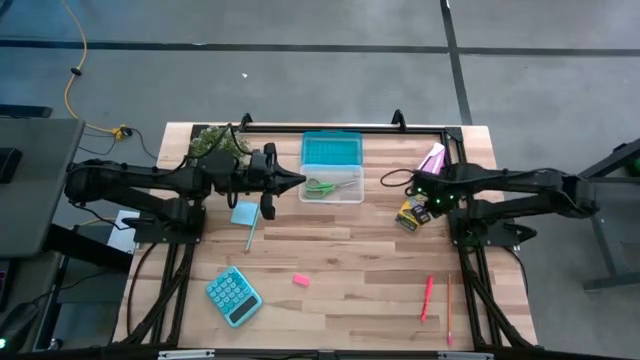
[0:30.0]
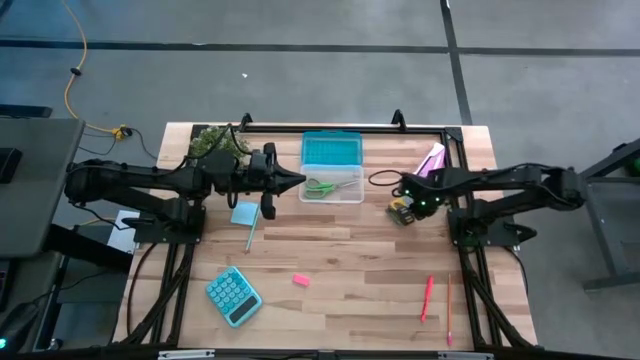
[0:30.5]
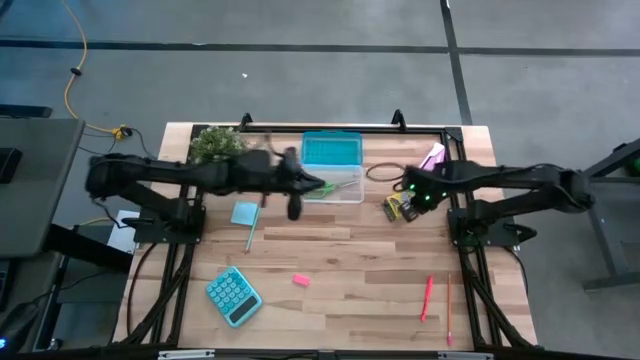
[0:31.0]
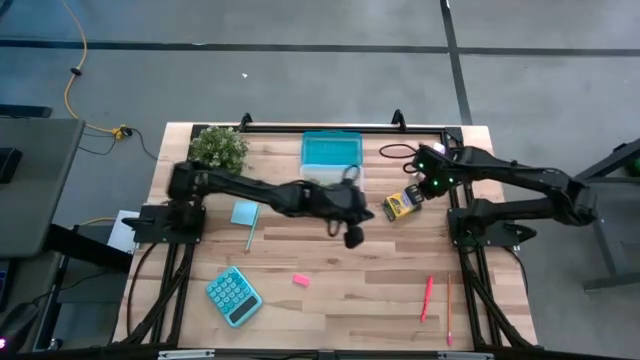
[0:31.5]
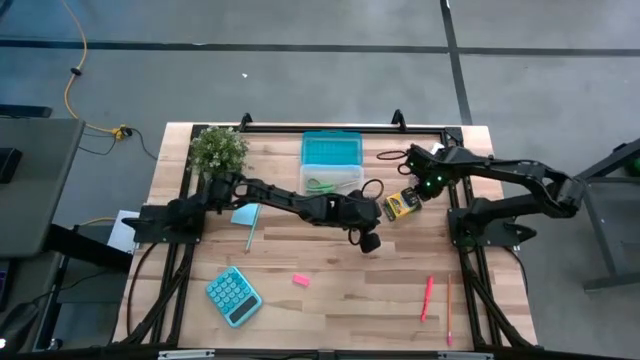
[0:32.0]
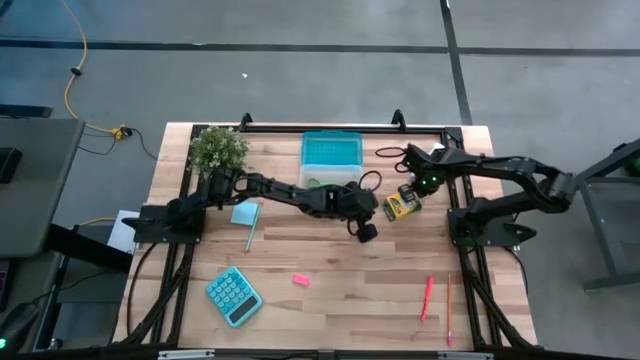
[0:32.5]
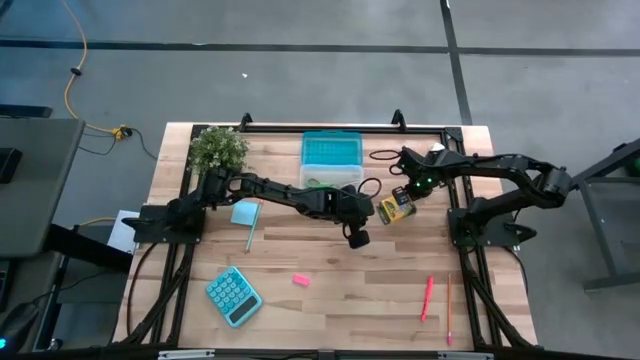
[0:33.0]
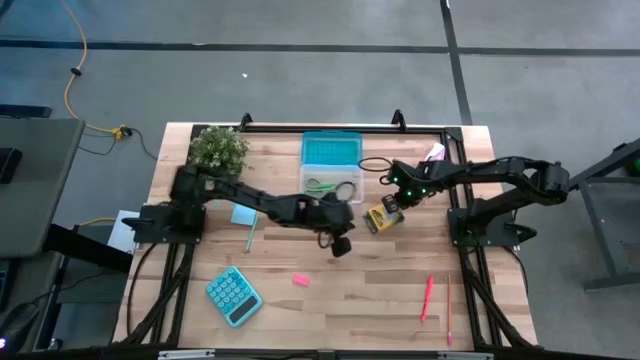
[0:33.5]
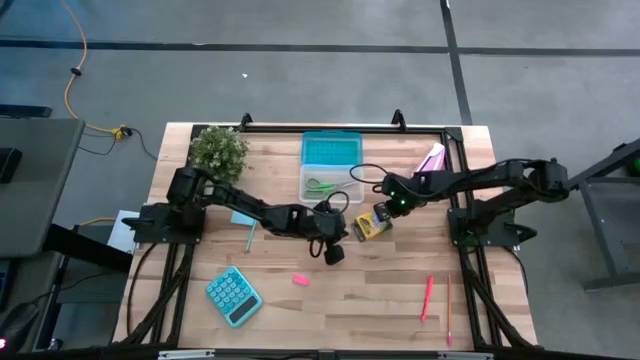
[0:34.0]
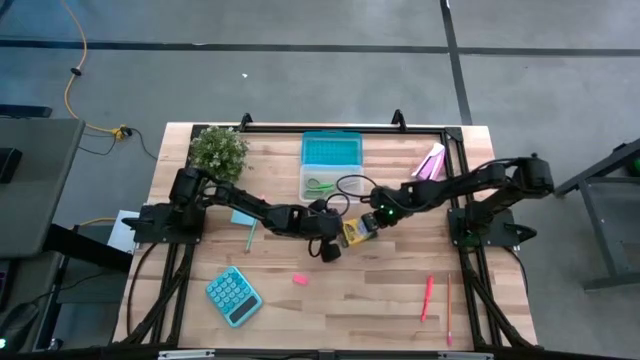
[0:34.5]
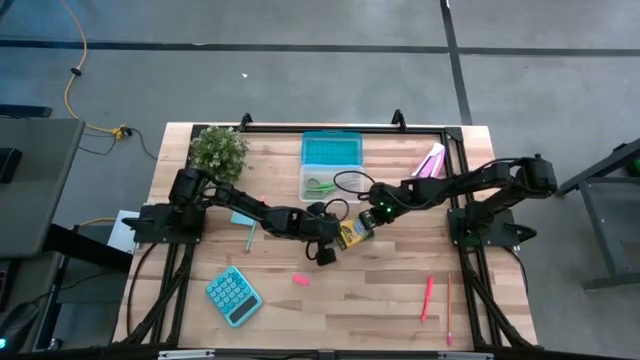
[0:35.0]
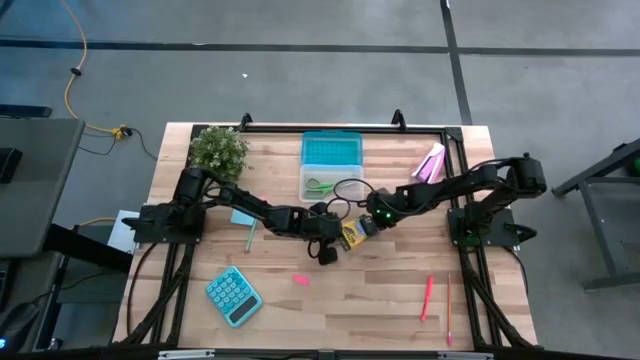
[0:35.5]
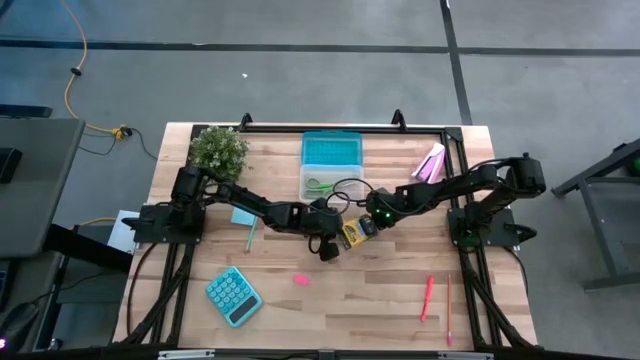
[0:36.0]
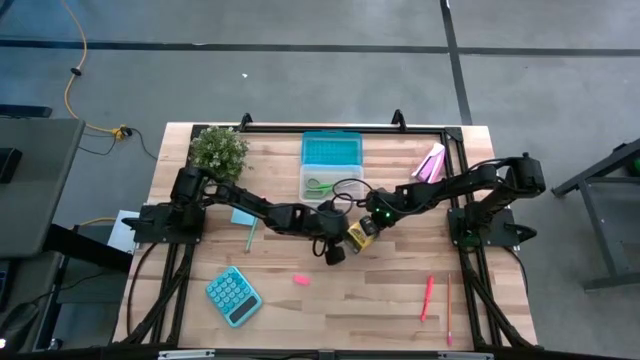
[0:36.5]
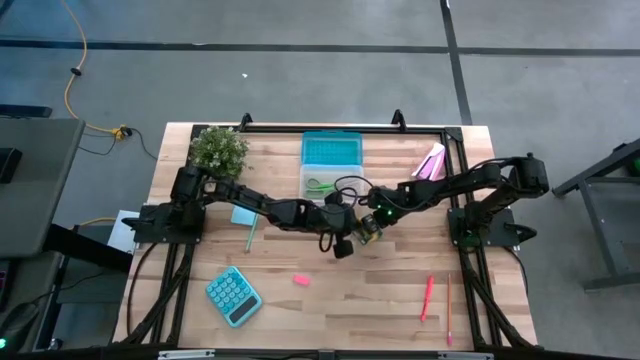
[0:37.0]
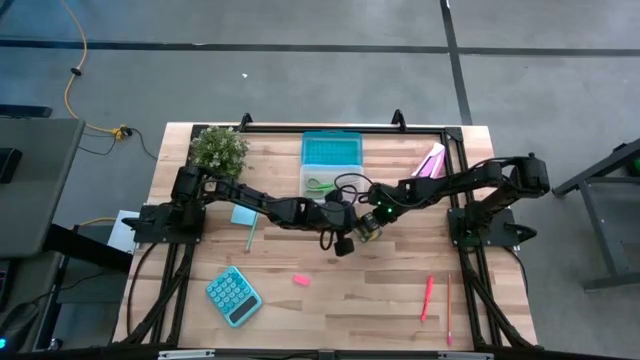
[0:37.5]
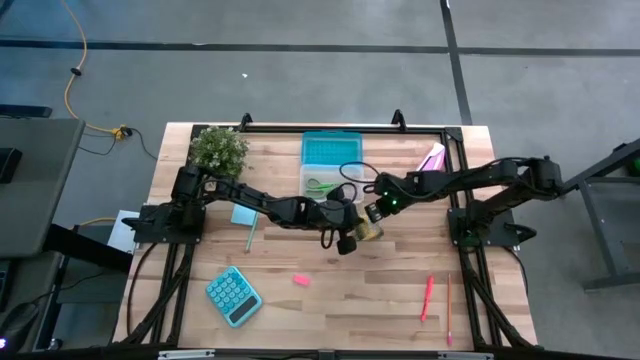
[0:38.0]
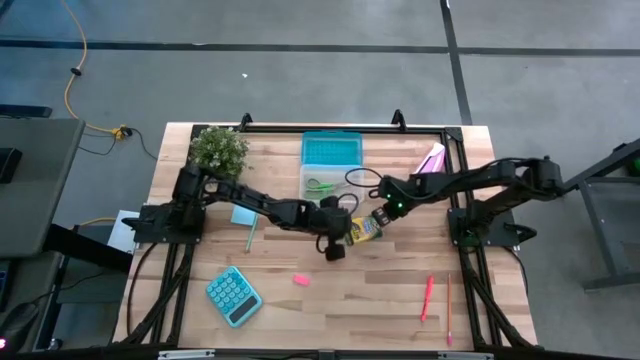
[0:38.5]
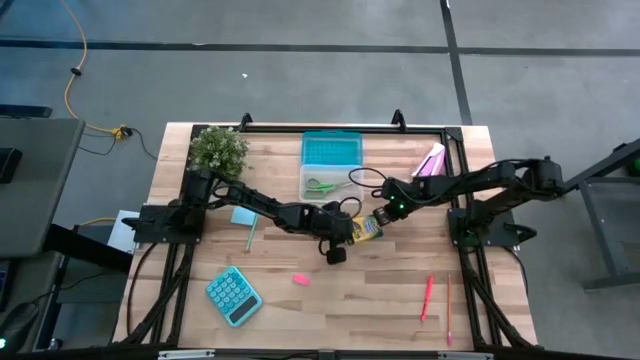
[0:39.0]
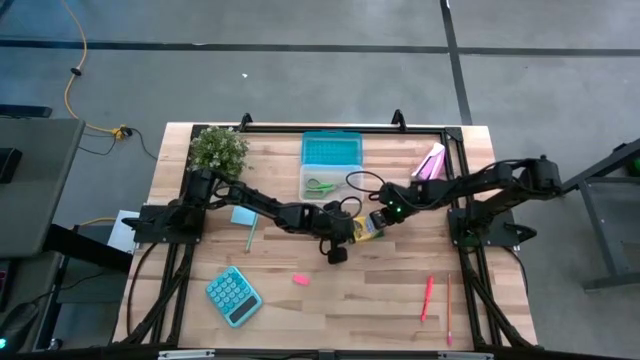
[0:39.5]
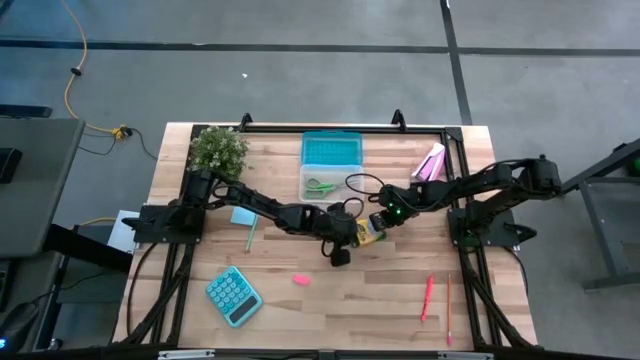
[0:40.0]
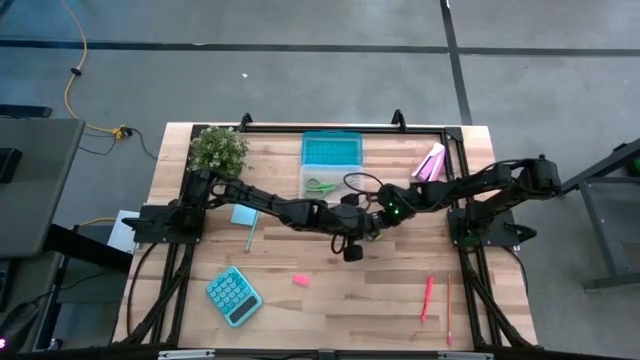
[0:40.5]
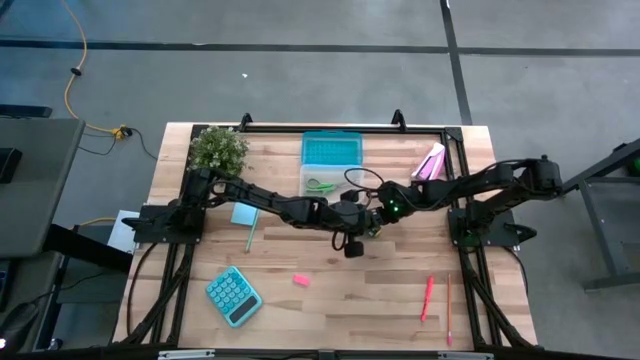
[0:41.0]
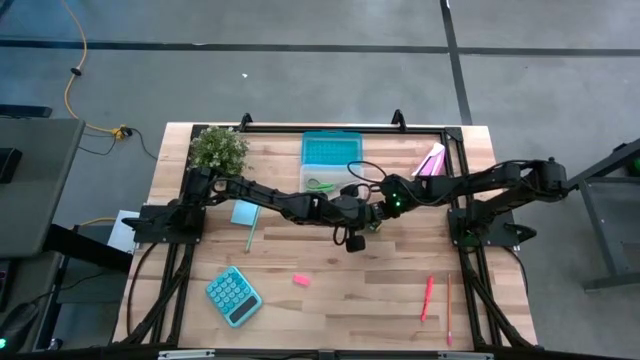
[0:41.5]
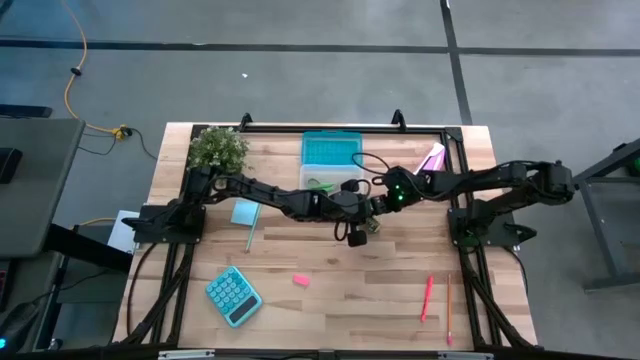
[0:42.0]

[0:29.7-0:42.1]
Task: Pack school essentials
Put the crayon box into the supply box

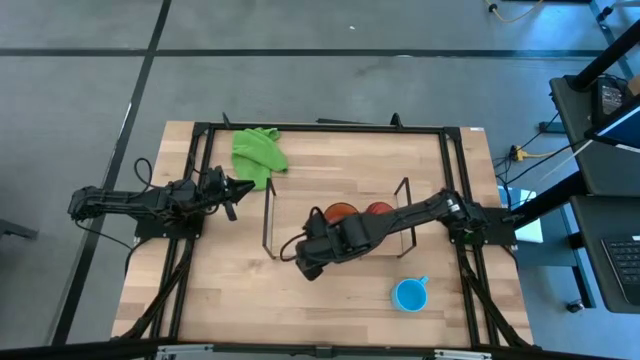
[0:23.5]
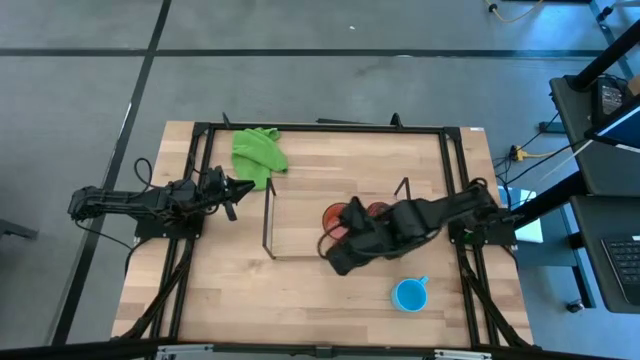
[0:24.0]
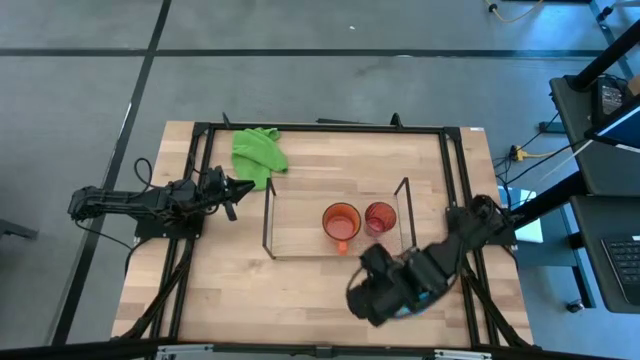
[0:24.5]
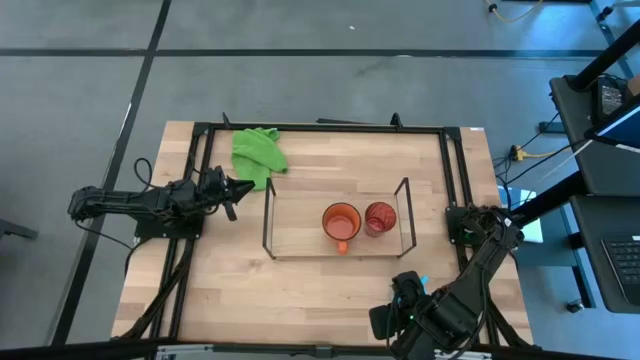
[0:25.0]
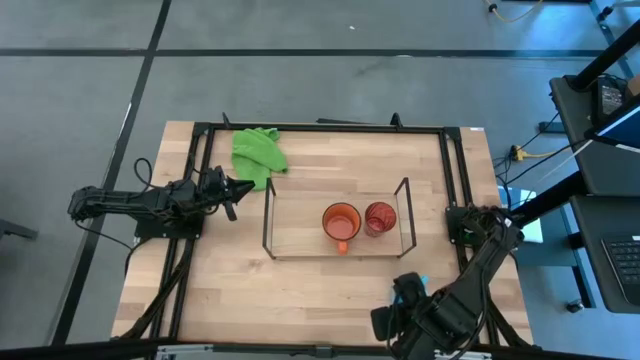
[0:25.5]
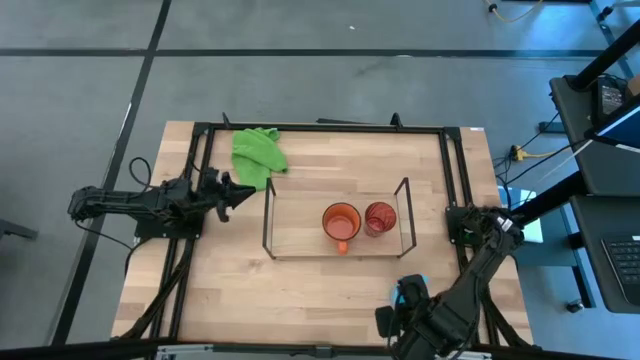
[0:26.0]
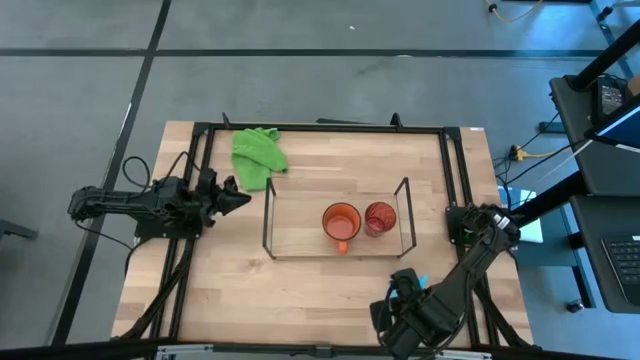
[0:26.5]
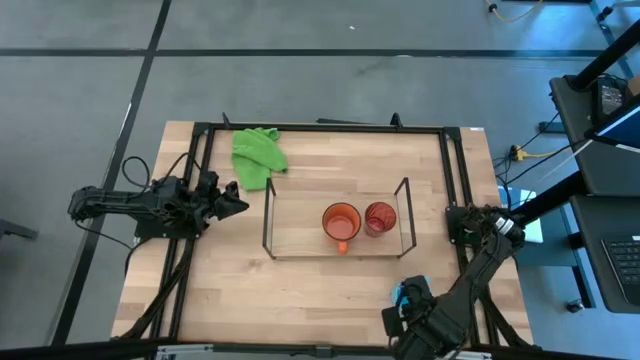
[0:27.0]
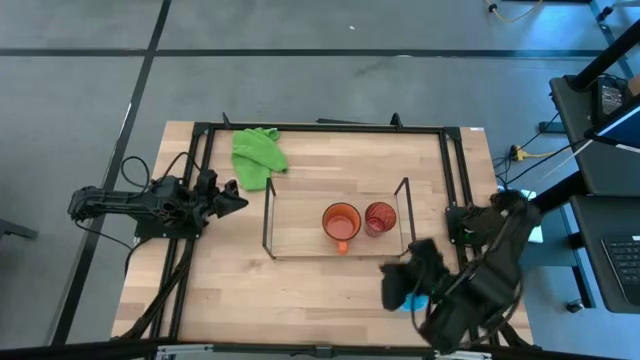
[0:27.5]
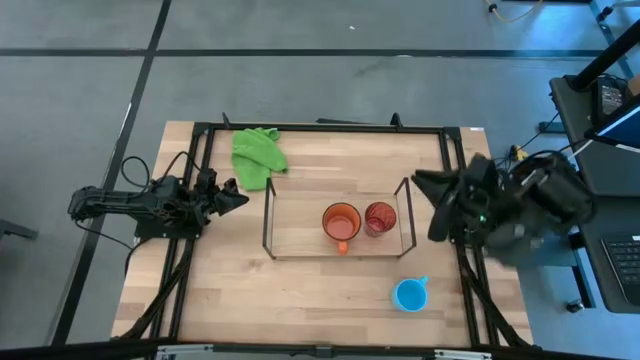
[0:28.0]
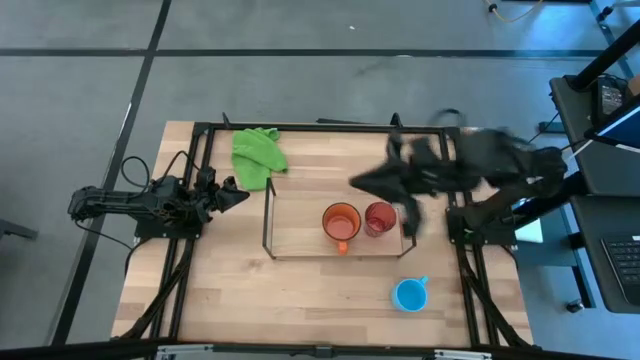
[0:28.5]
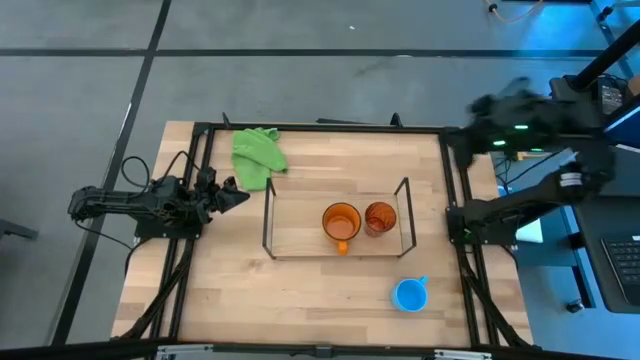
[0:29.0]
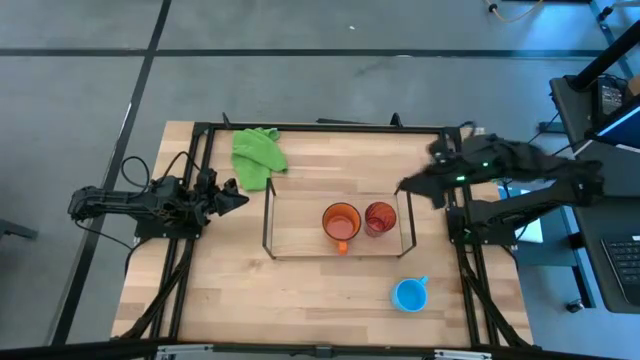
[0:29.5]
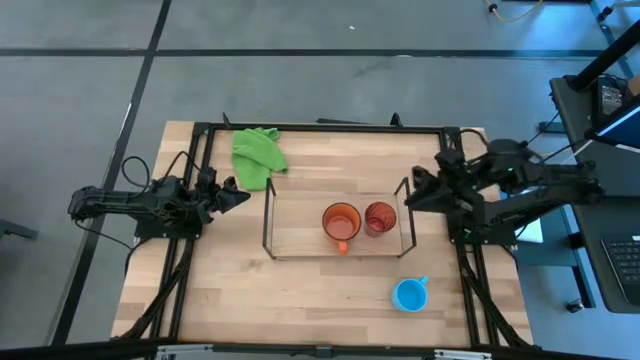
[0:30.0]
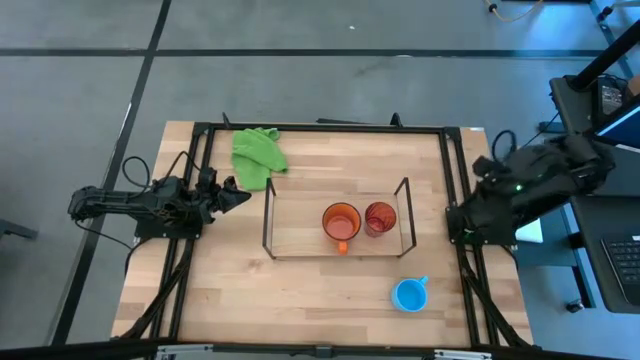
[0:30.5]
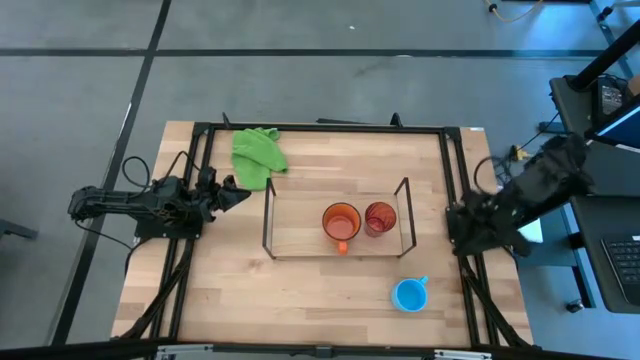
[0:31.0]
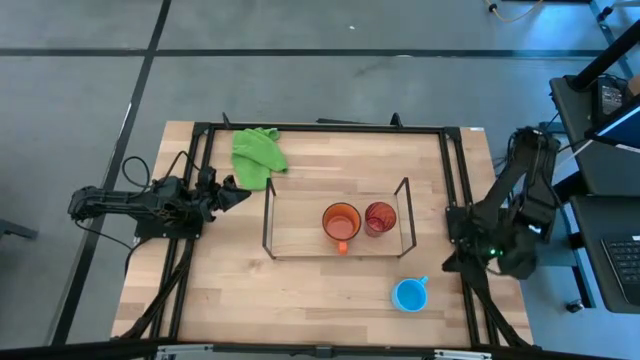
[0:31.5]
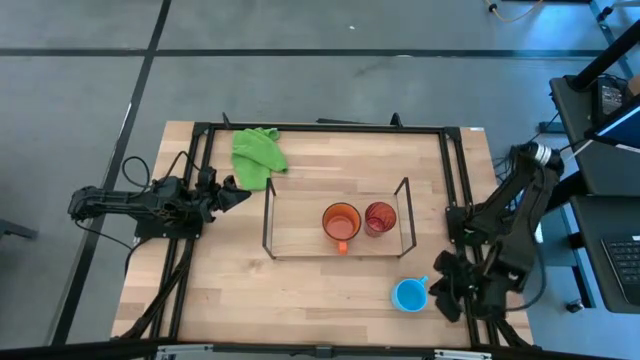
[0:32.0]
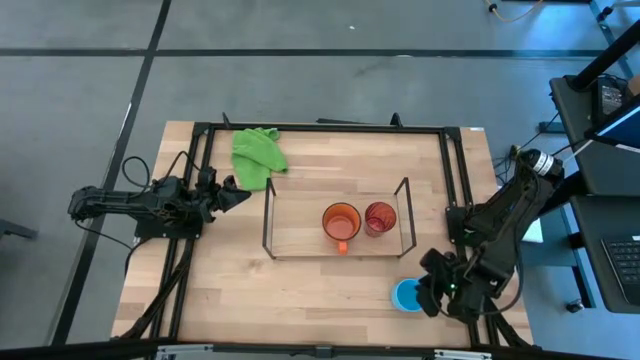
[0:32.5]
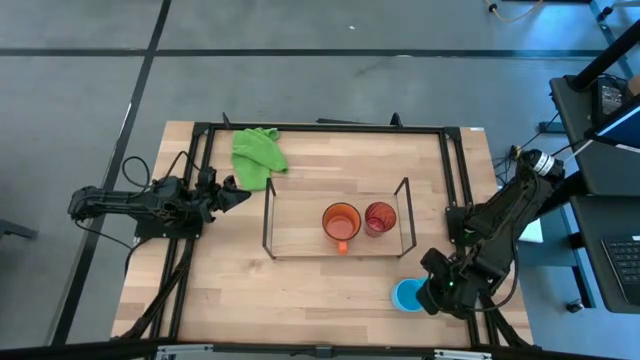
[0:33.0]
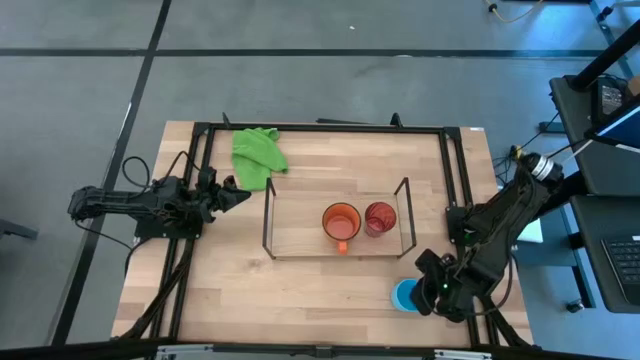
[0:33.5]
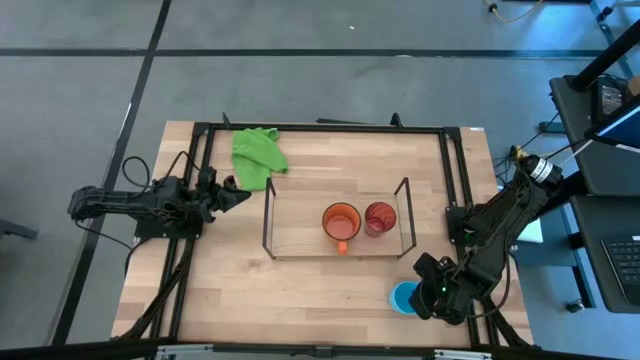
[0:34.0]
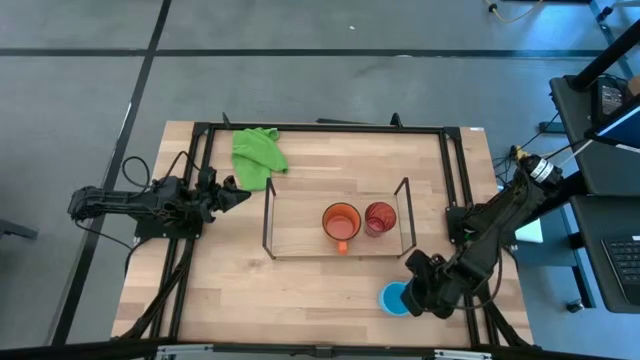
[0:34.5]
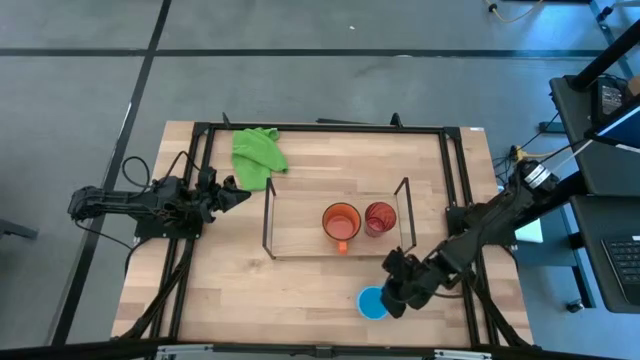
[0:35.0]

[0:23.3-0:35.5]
Task: Stack small to large cups/mugs on shelf
Put the blue mug on the shelf
